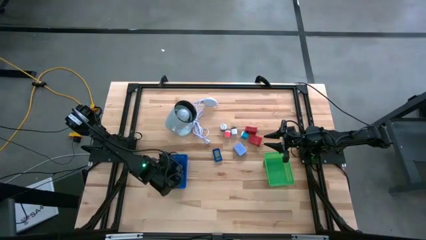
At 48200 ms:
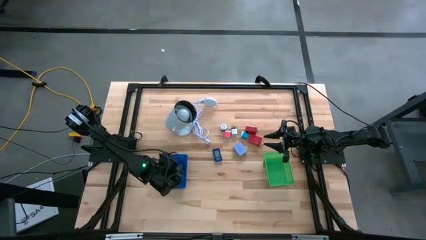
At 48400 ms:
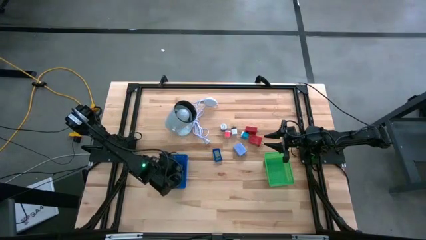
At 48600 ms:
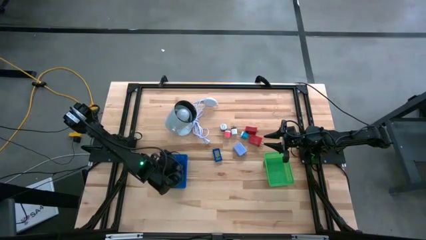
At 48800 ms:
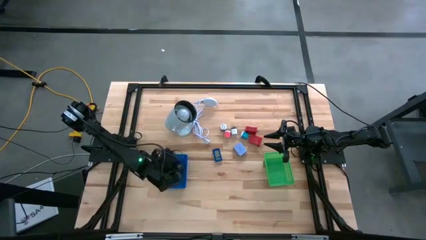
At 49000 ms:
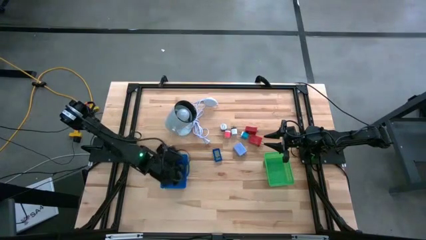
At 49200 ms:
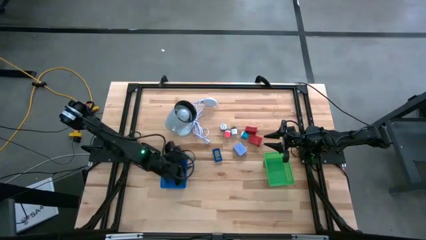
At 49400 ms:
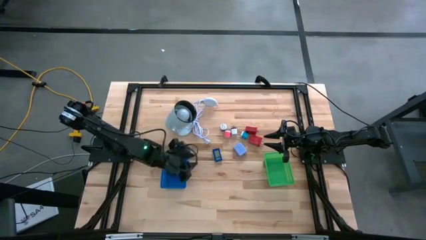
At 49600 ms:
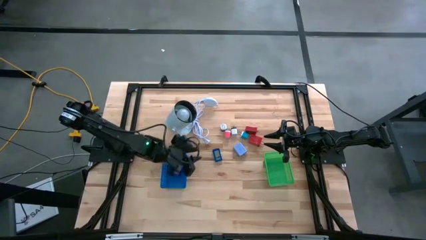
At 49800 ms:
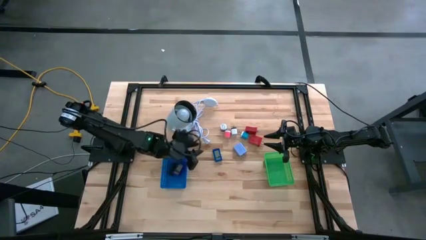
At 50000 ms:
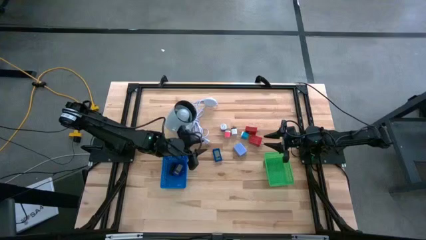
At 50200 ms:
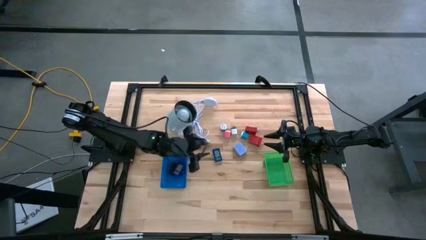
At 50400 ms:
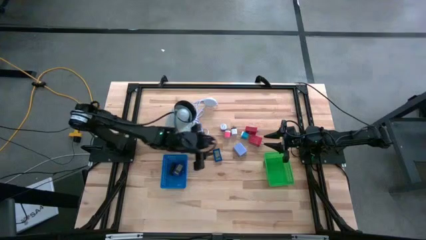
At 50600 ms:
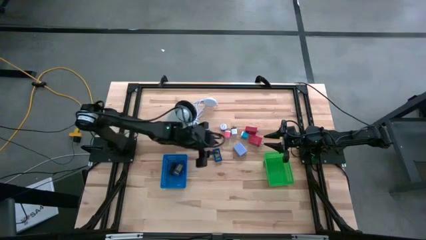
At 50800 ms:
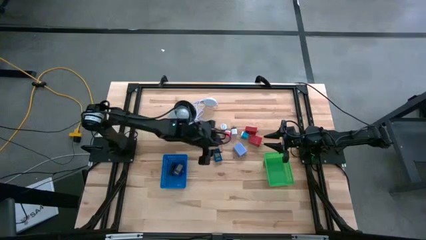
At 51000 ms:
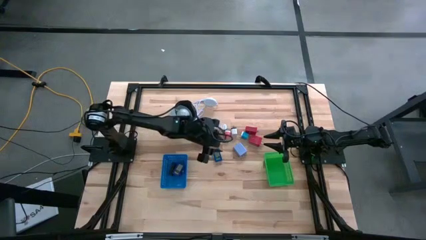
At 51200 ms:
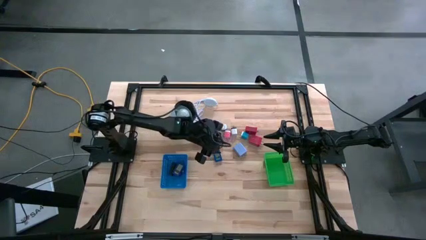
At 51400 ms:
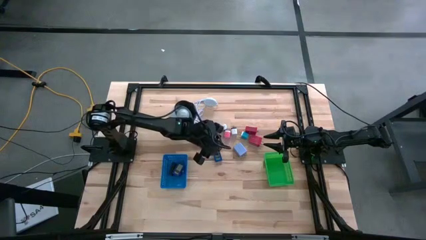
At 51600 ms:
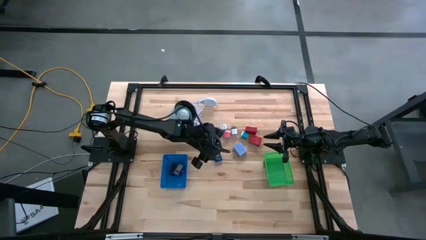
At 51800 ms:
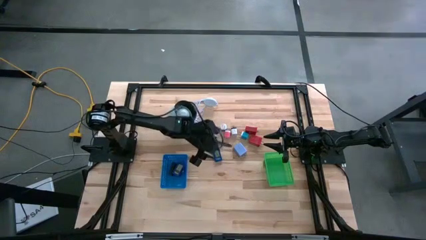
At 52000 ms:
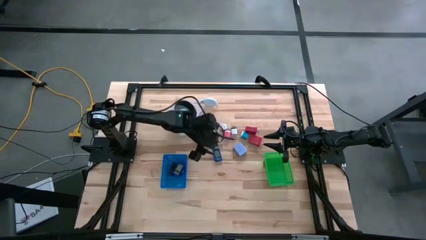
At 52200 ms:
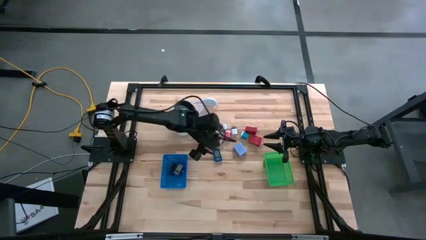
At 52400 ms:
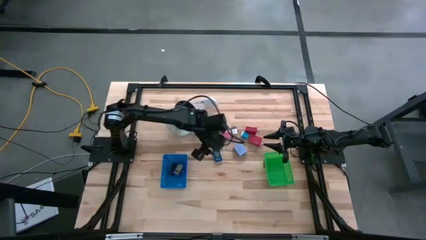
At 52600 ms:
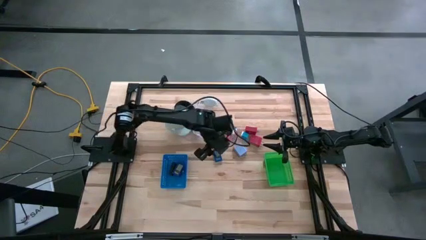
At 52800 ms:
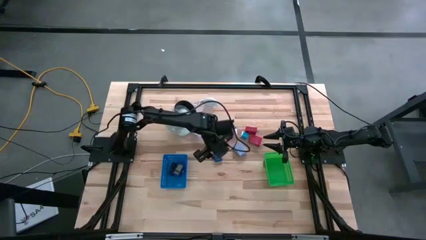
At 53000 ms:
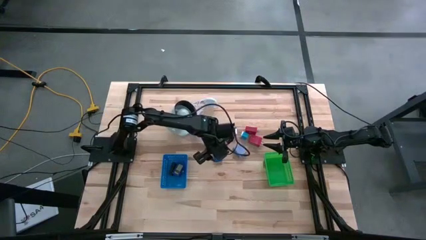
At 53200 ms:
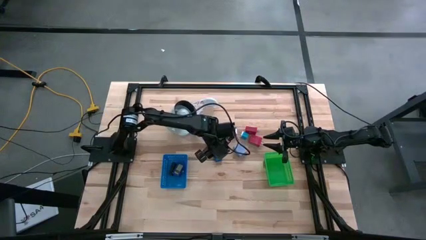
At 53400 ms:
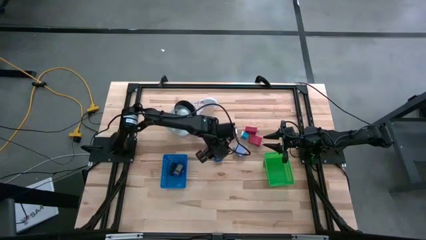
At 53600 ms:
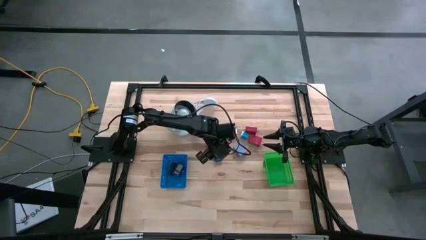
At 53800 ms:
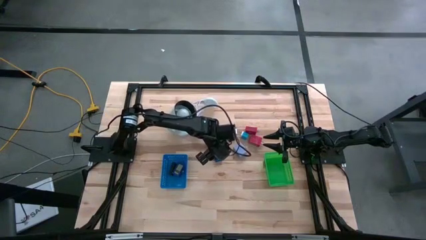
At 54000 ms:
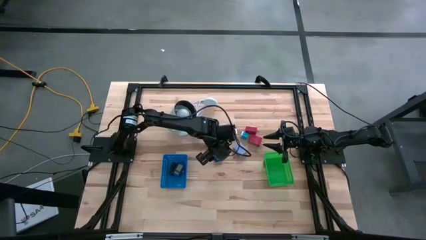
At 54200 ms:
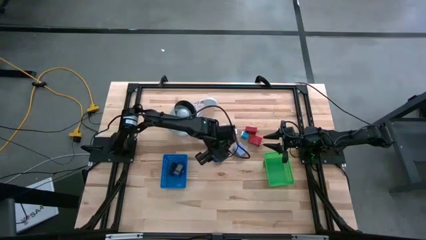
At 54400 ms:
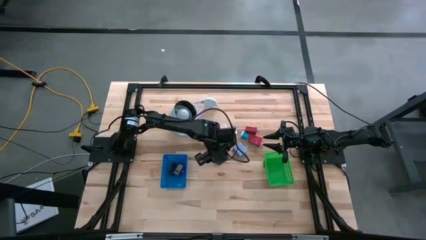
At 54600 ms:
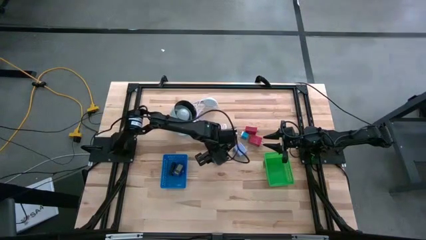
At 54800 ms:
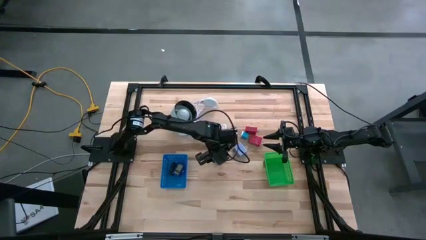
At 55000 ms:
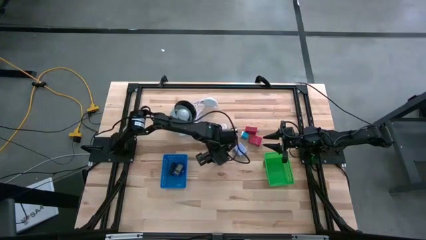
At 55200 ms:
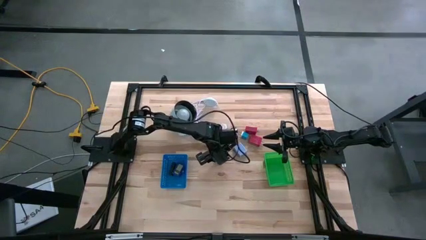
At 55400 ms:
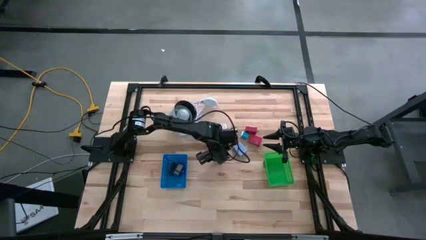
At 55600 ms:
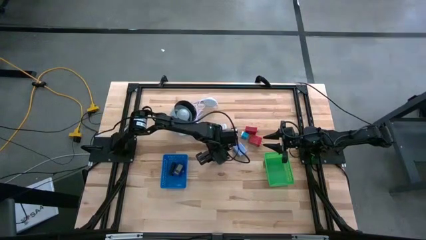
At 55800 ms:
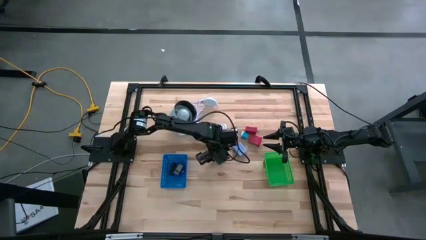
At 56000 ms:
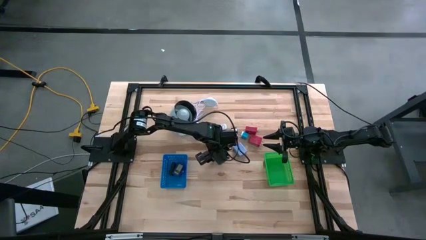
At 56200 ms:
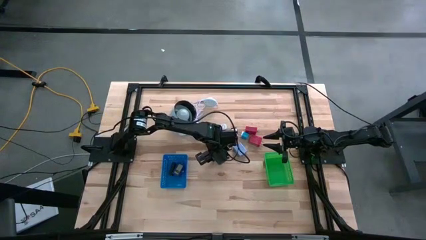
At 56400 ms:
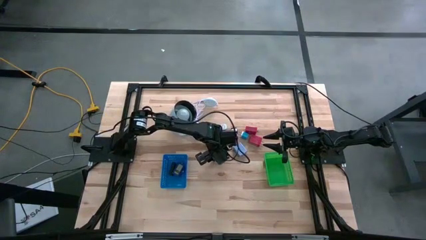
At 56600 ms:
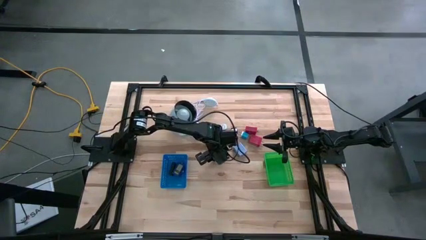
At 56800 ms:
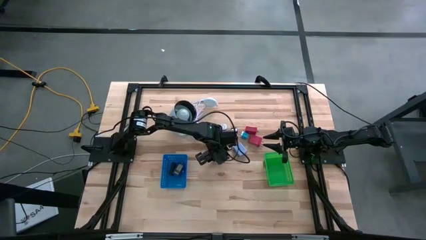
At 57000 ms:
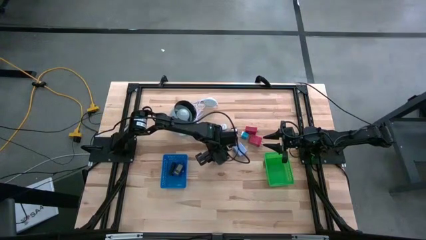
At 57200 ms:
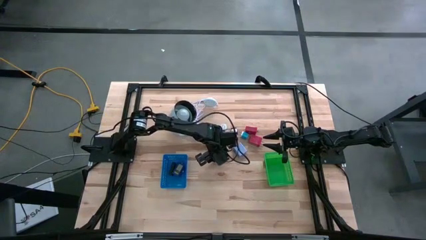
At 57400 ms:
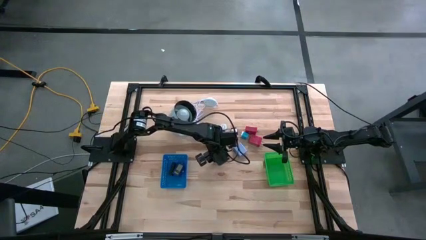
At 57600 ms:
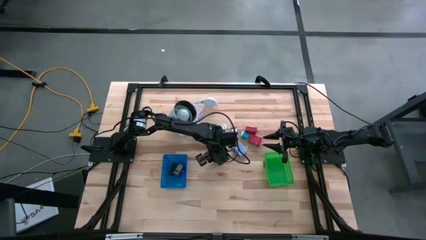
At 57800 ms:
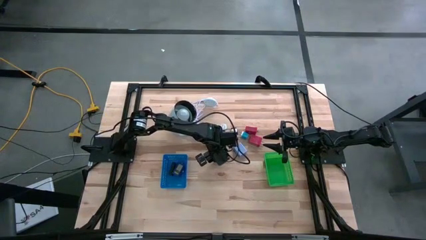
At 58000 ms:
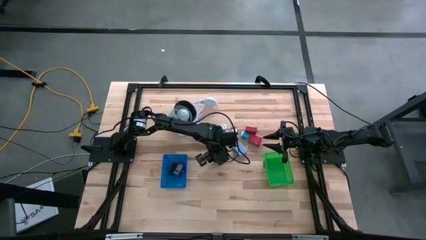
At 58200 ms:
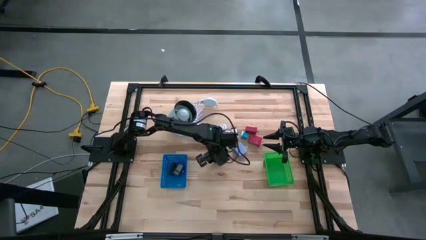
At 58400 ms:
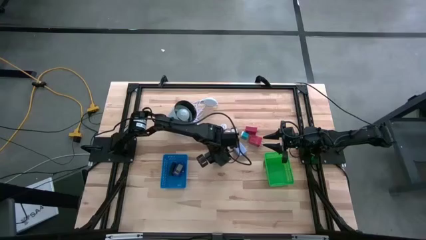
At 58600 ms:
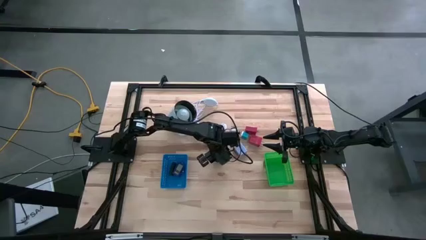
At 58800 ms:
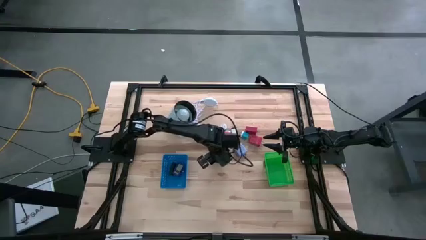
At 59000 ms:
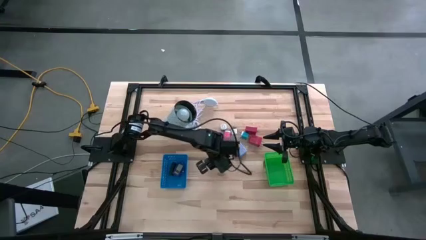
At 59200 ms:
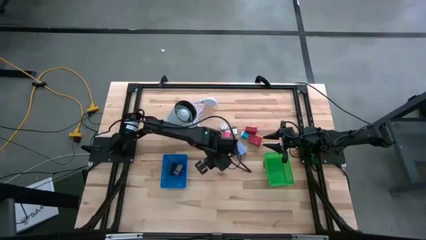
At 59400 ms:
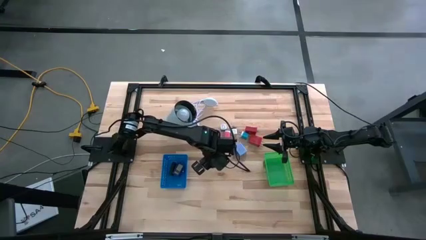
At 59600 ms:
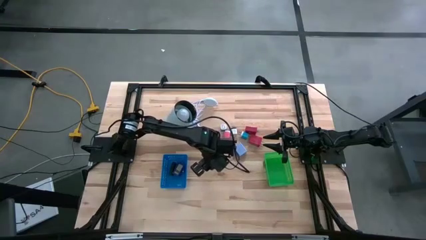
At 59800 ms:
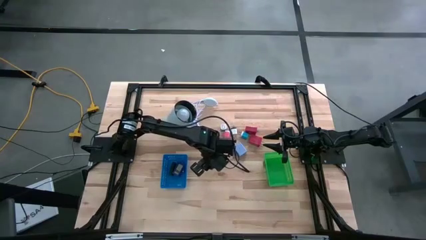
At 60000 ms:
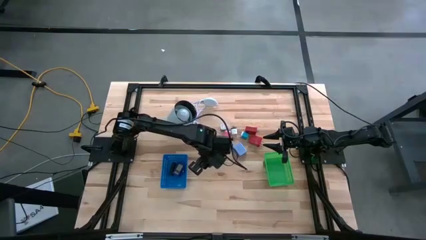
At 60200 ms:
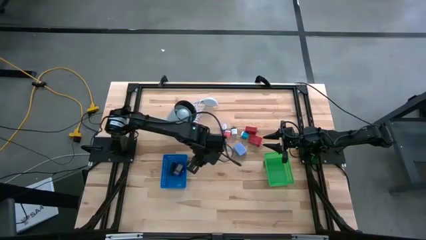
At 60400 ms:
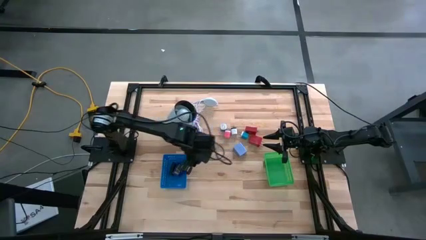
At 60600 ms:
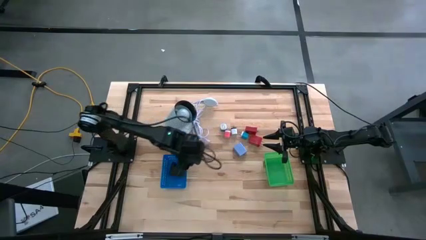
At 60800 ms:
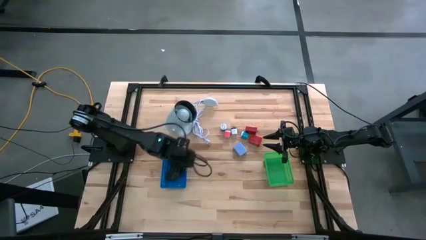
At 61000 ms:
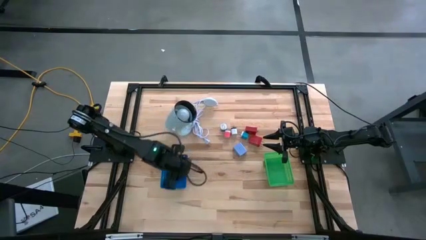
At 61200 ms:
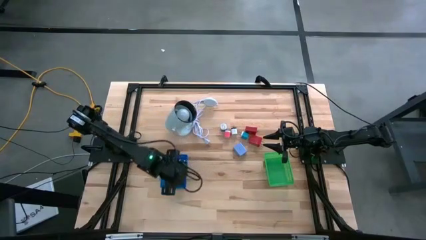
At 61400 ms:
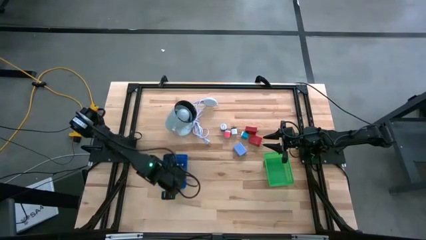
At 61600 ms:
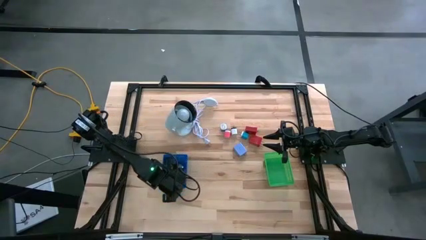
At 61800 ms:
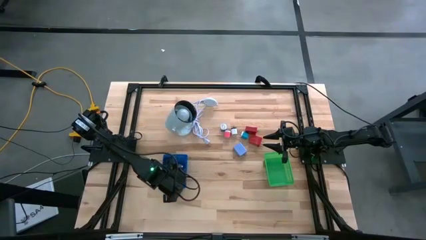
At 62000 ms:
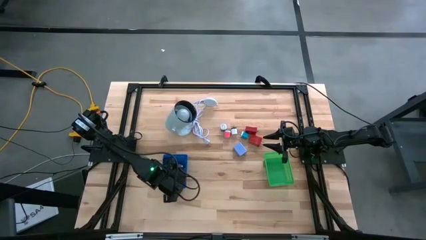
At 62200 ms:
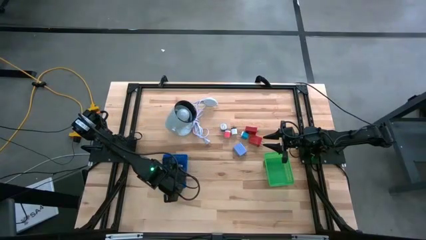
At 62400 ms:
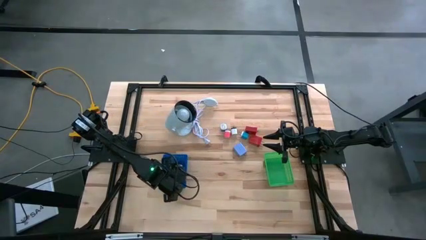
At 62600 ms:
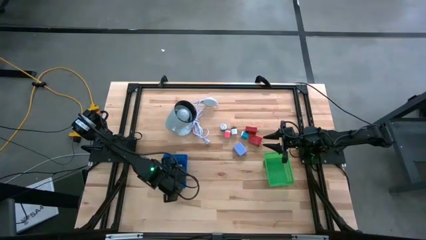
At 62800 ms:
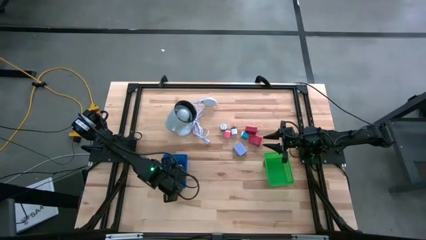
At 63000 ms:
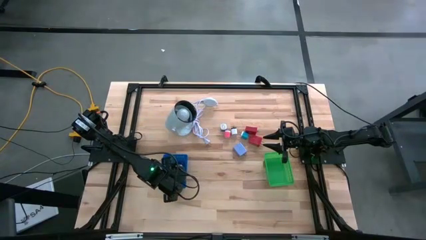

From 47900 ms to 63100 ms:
Task: Pick & Place Office items
Put the blue digital timer into the blue bin

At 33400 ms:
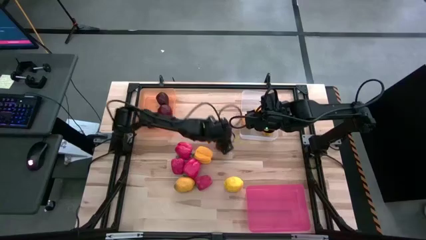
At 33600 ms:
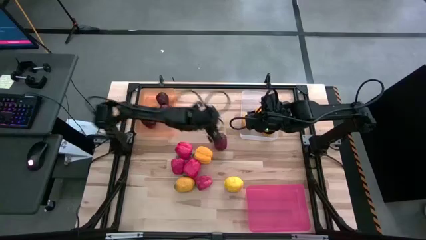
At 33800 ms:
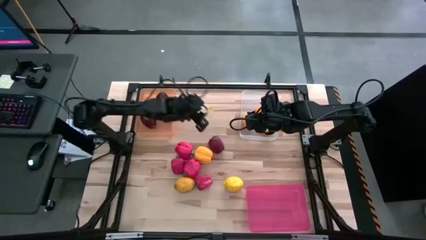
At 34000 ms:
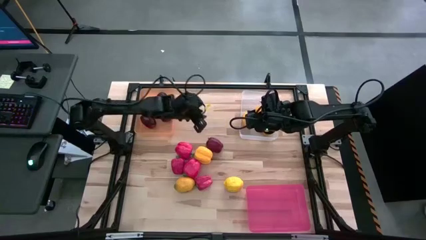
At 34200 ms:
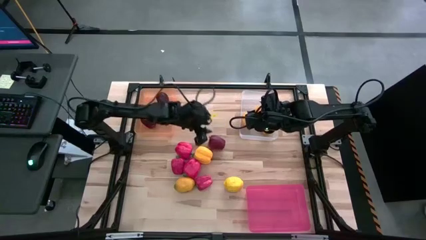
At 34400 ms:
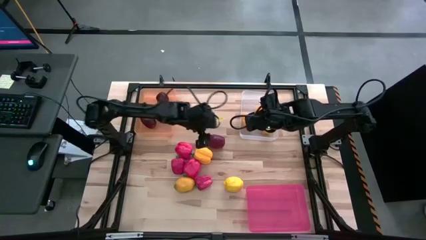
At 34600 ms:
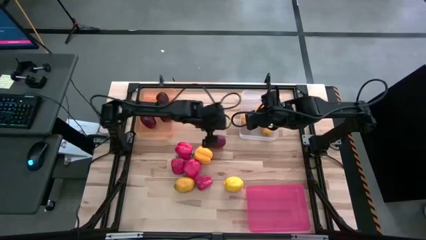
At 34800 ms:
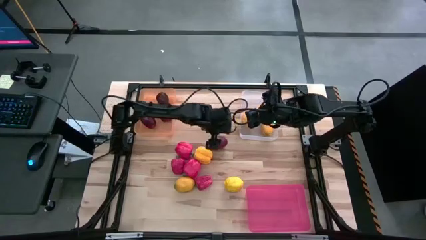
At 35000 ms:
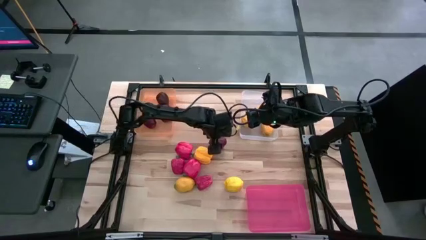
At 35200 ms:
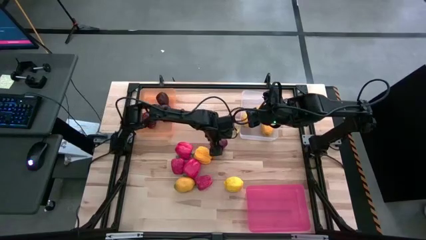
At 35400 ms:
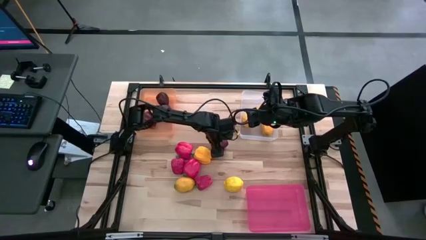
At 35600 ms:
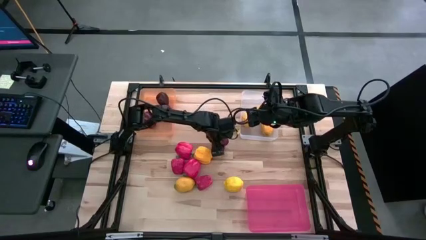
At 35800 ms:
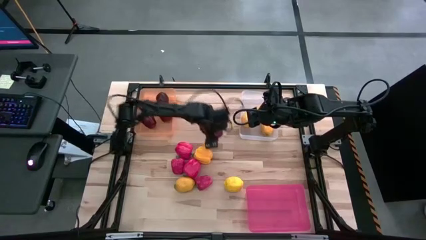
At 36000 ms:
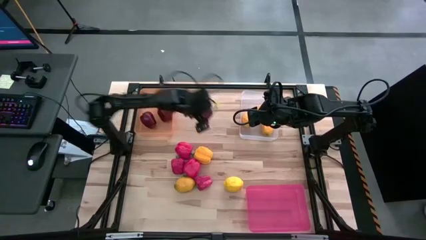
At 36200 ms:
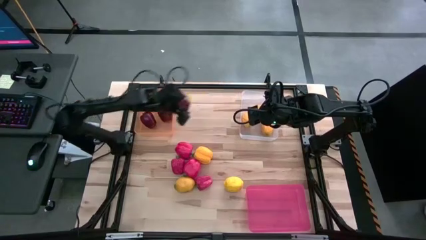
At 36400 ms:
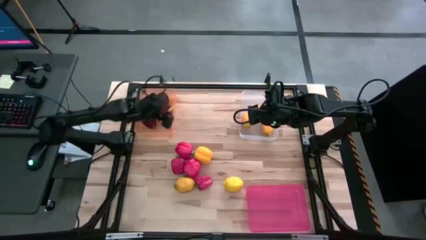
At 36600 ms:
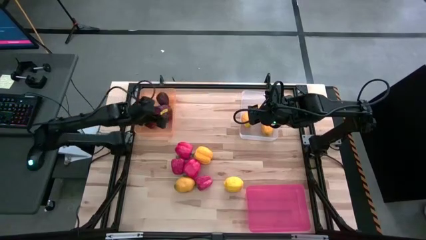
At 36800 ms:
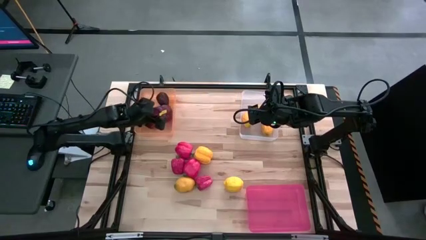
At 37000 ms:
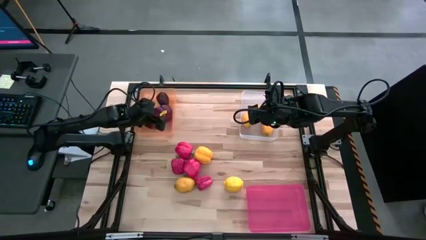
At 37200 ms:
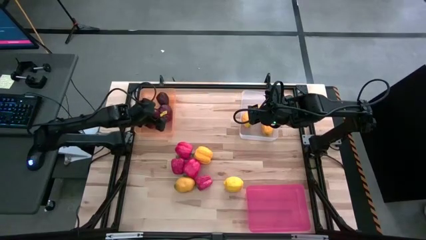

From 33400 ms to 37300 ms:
Task: Sort produce into baskets
Put the apple into the orange bin
